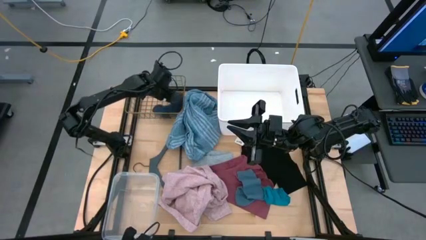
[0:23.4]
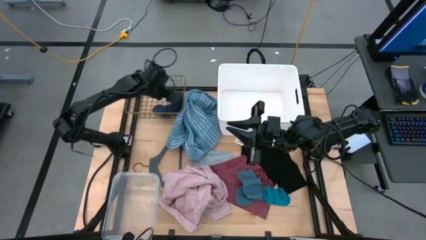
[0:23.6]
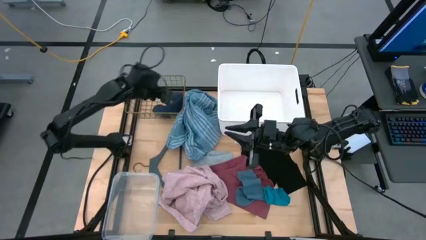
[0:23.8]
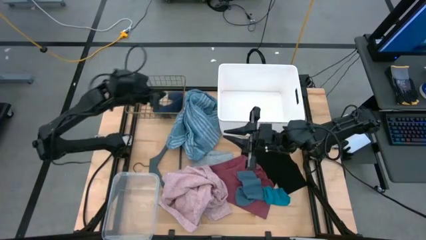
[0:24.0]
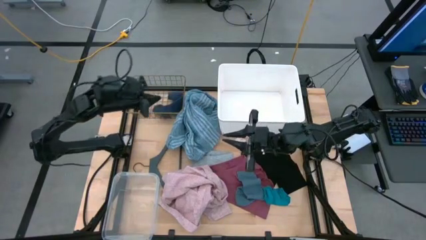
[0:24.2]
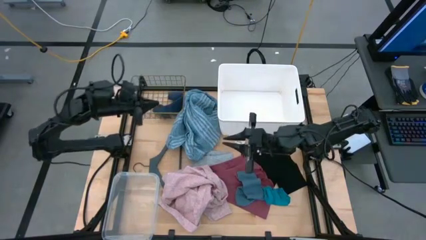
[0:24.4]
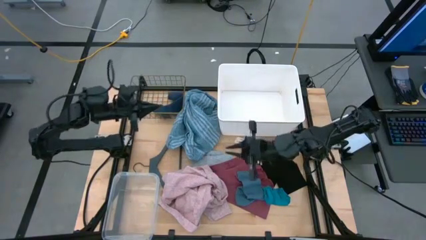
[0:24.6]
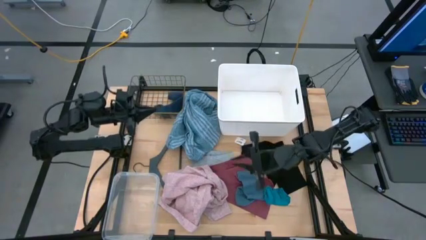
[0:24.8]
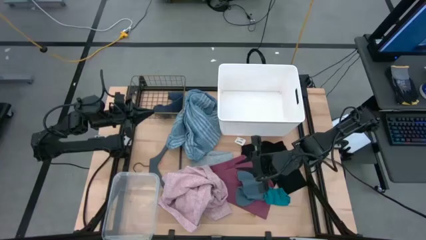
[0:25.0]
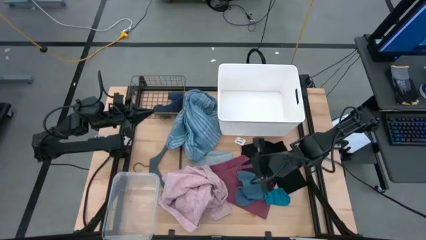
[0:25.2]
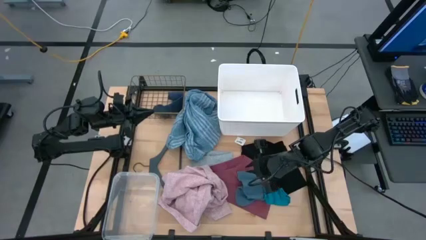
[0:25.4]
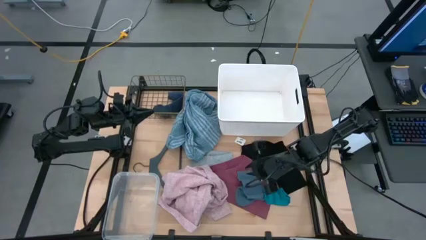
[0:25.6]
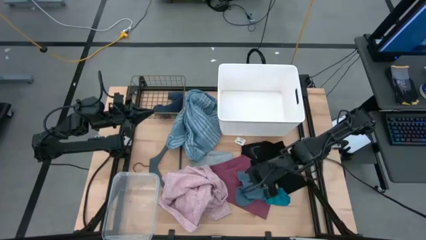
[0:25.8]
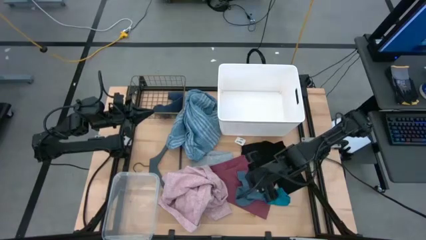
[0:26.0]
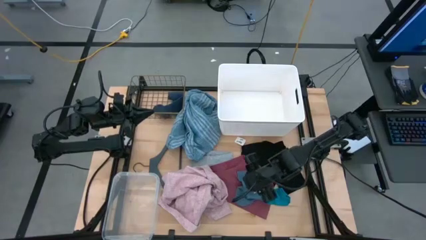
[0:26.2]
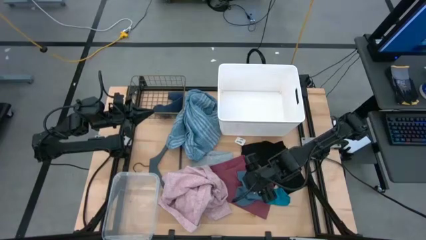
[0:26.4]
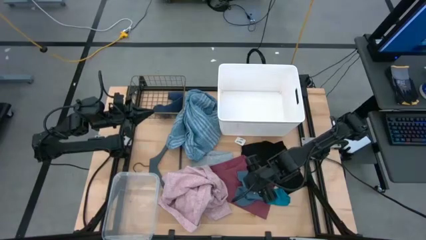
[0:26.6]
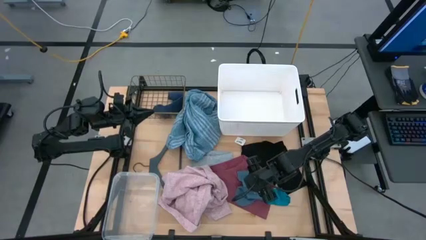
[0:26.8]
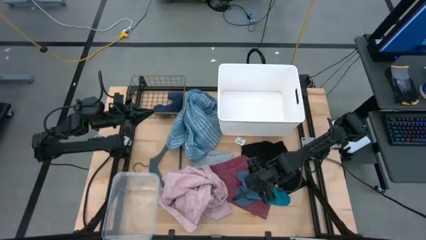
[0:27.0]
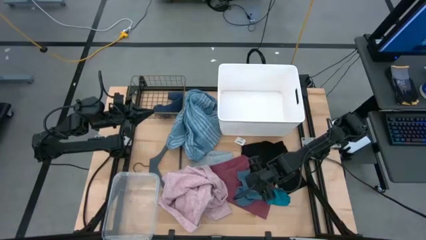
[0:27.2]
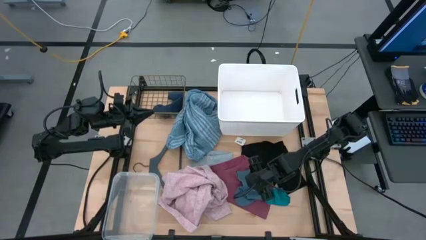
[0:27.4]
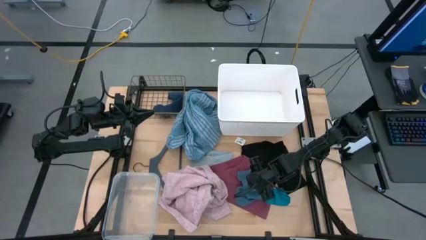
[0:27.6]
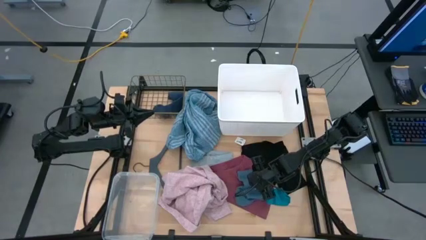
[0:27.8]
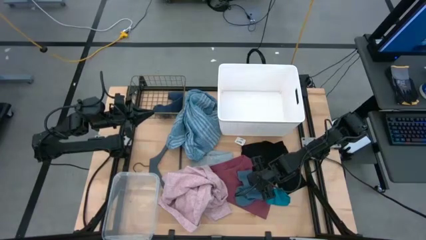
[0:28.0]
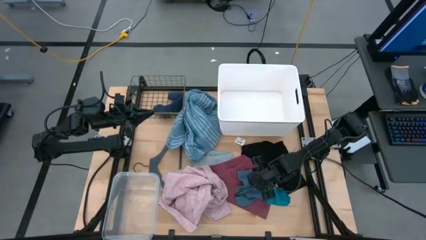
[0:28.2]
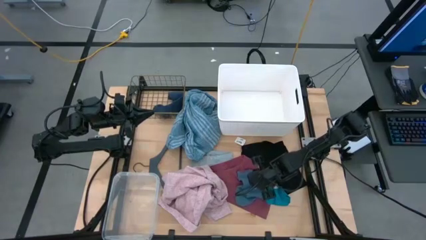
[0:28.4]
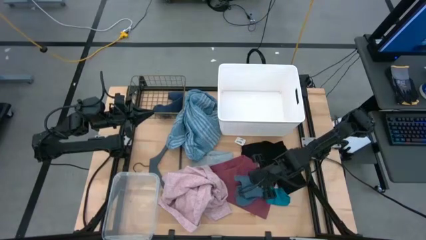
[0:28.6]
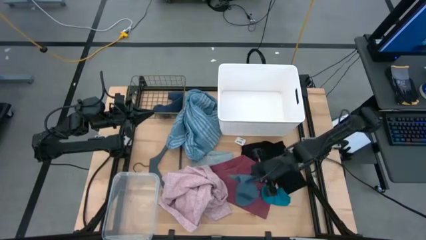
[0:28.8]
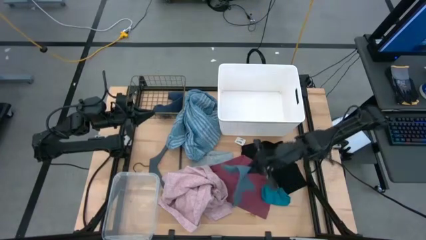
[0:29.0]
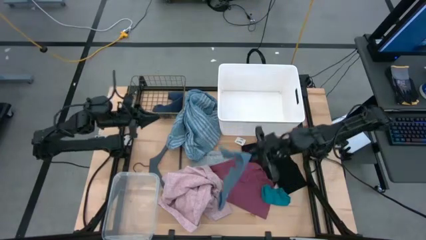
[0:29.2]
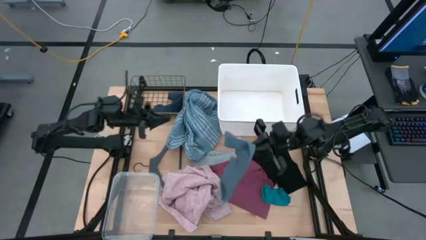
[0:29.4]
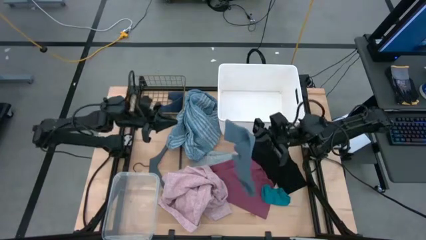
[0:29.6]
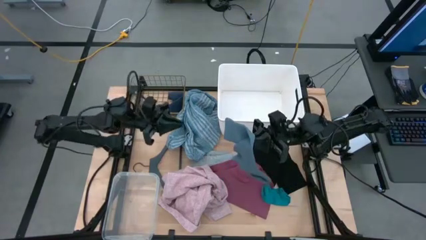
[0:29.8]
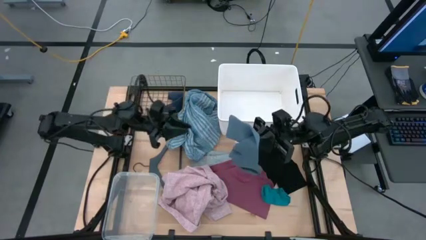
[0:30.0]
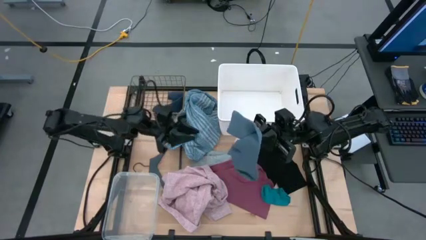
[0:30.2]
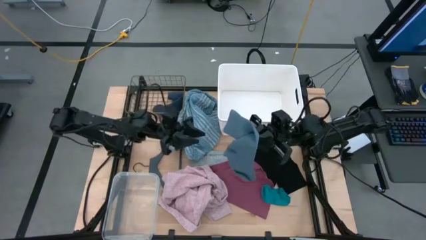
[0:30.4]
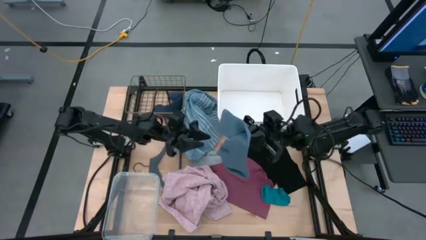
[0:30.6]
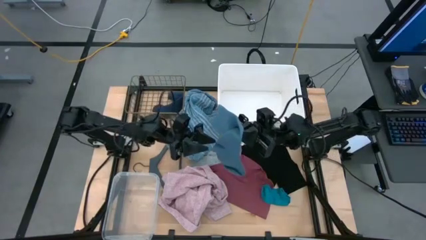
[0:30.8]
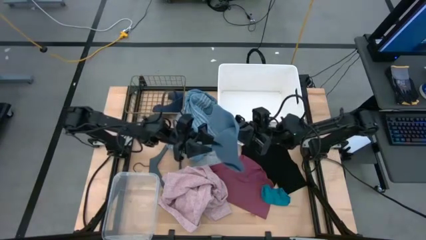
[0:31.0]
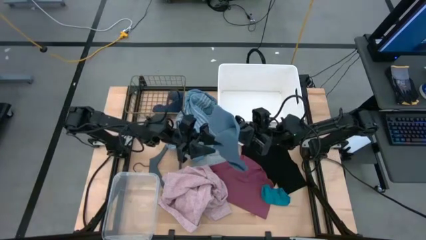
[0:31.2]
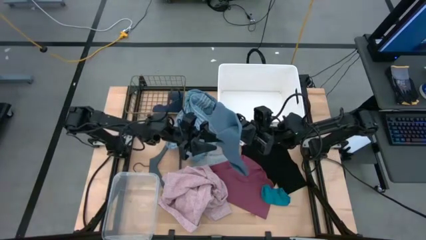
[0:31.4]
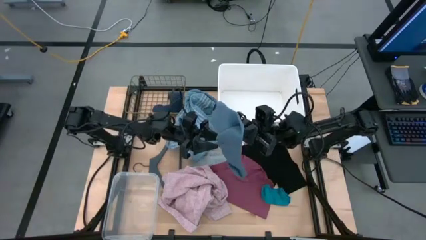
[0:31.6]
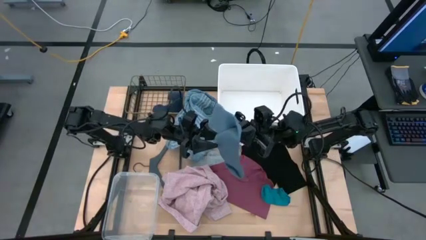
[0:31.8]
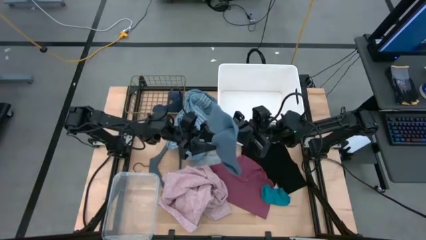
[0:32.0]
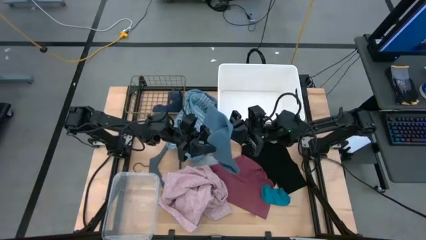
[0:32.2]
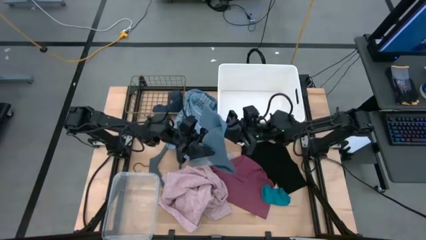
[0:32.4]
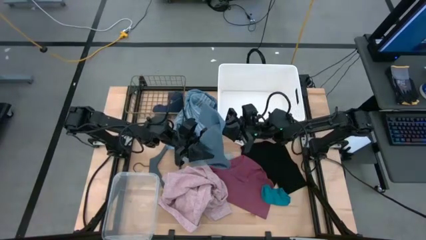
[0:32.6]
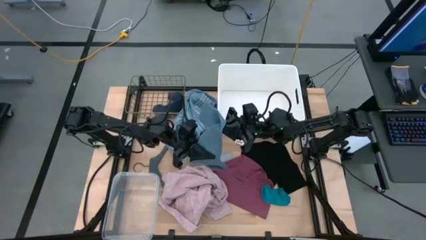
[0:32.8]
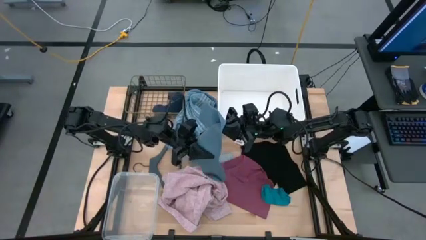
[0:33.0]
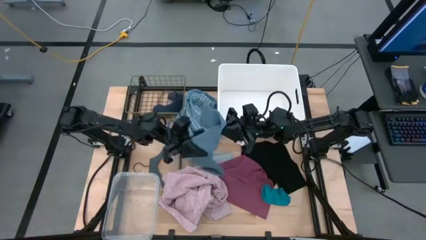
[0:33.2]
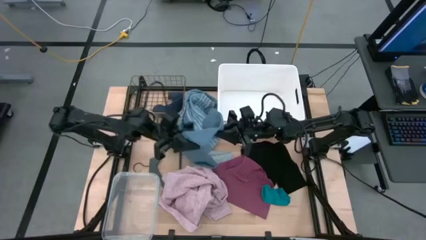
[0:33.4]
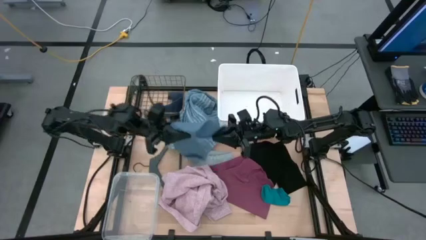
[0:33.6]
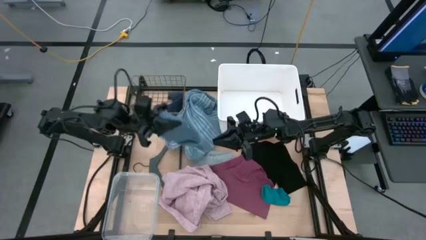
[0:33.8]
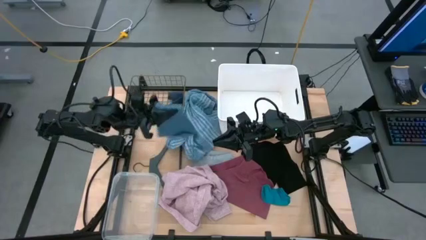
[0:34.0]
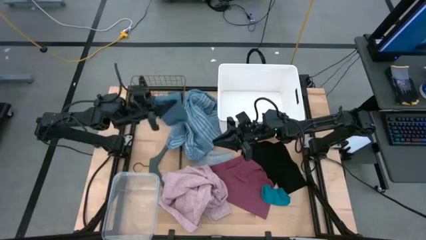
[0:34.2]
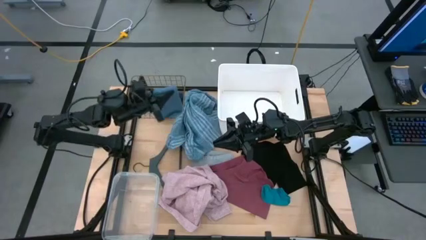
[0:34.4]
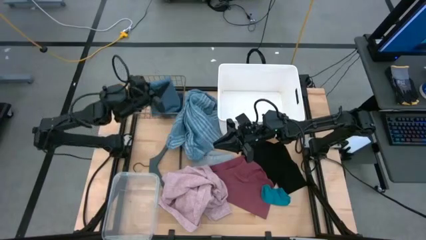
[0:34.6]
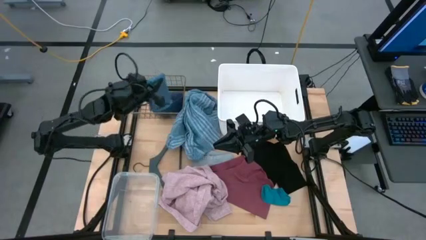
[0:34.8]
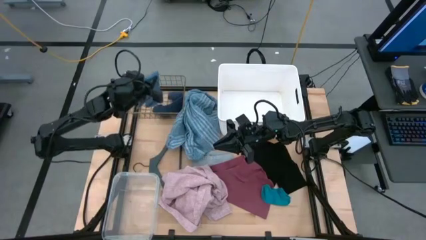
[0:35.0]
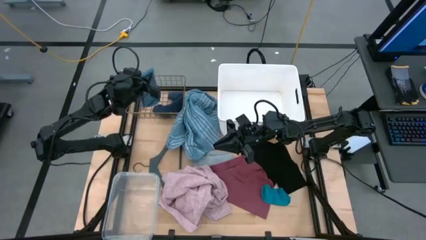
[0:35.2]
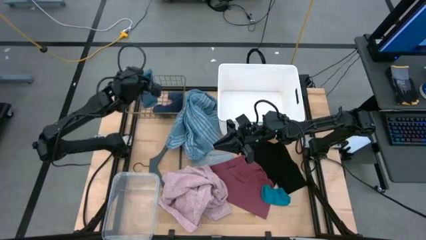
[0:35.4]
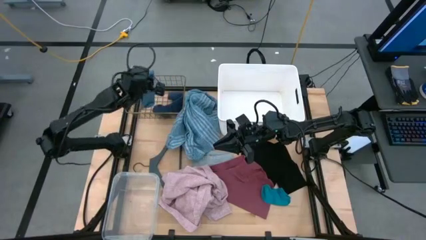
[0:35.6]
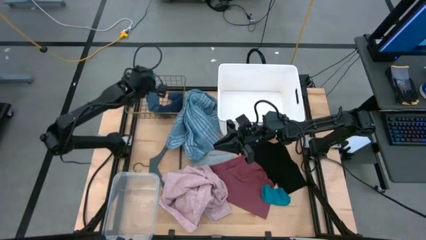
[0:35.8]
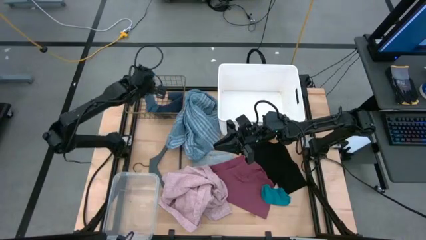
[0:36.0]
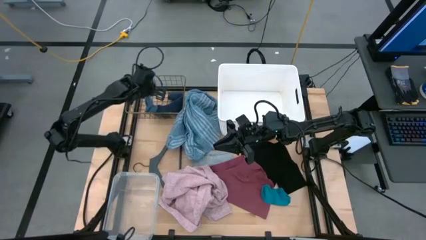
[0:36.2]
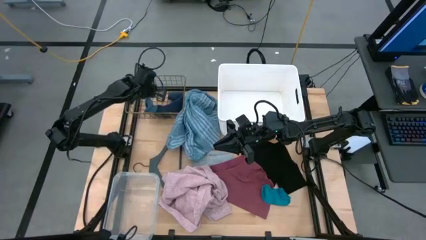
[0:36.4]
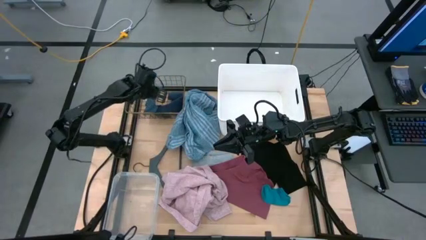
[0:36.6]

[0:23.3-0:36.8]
Task: Pick & Place Cloths
Put the blue sock into the wire basket

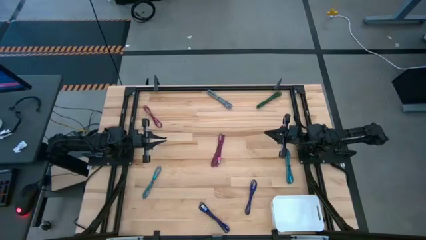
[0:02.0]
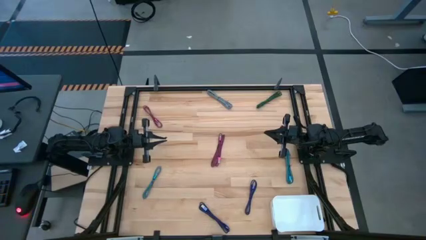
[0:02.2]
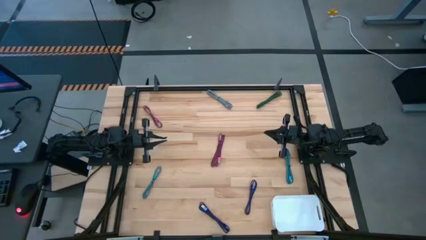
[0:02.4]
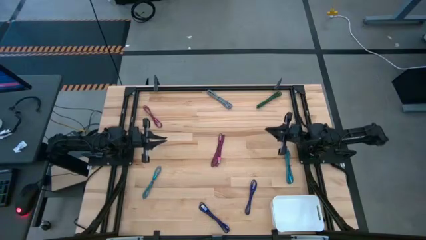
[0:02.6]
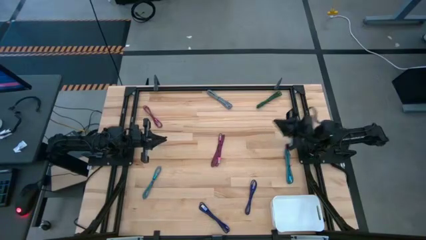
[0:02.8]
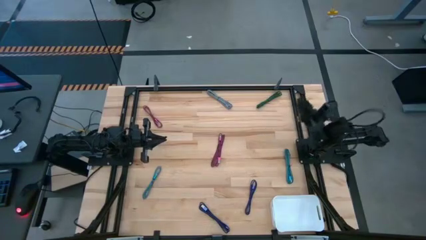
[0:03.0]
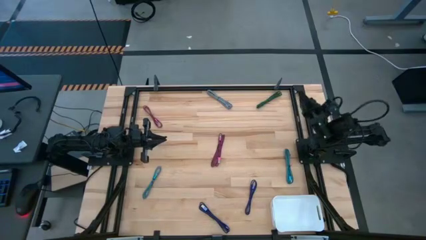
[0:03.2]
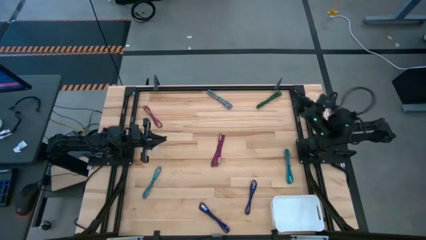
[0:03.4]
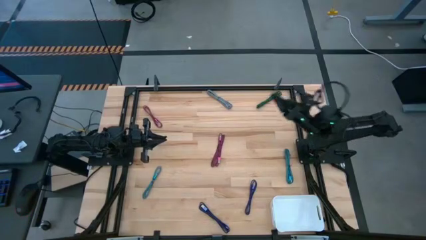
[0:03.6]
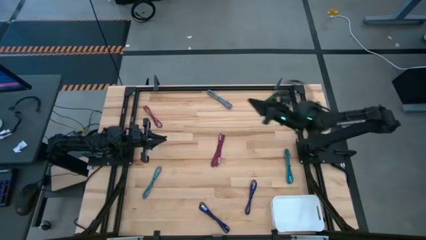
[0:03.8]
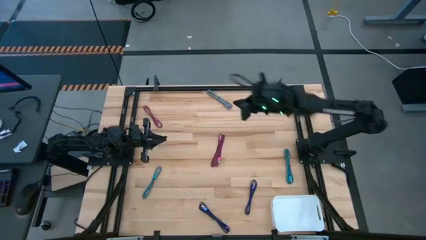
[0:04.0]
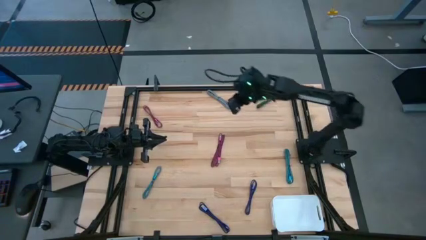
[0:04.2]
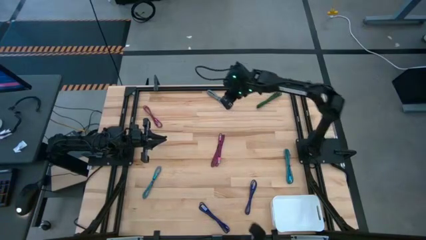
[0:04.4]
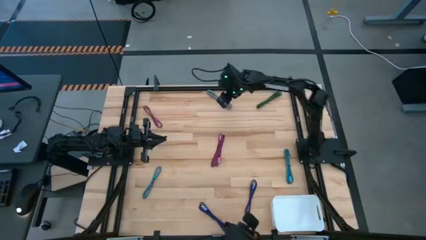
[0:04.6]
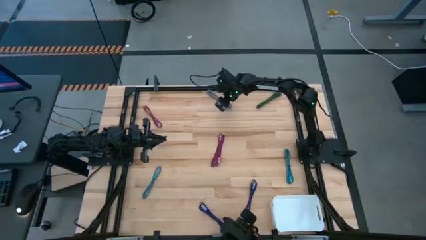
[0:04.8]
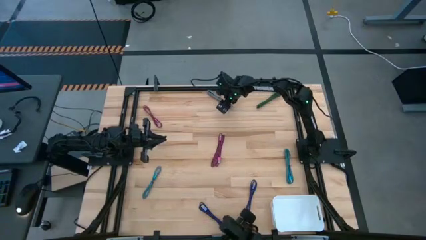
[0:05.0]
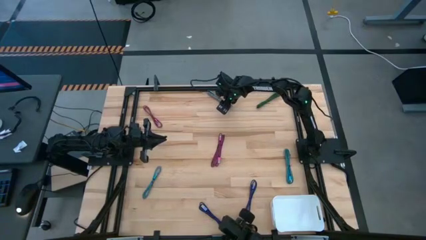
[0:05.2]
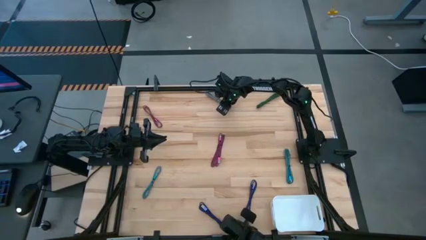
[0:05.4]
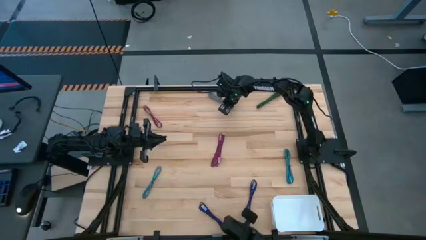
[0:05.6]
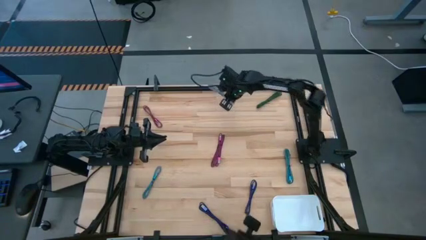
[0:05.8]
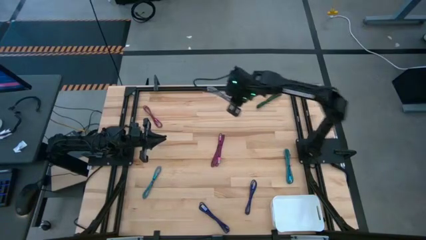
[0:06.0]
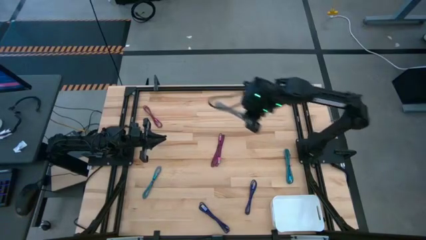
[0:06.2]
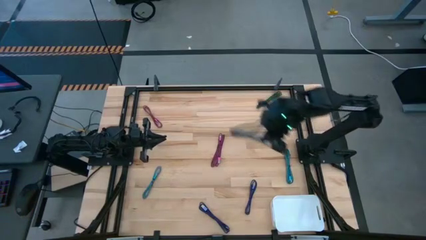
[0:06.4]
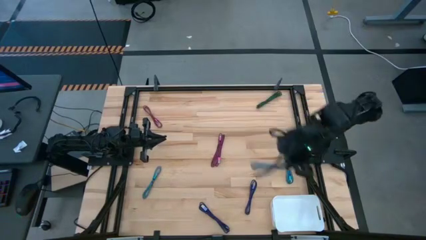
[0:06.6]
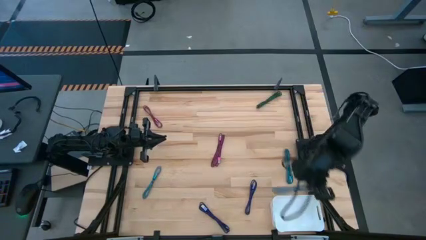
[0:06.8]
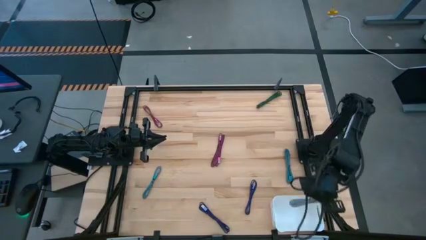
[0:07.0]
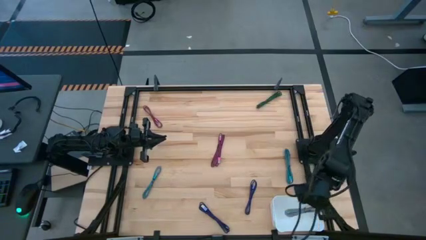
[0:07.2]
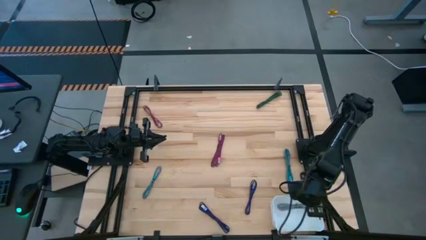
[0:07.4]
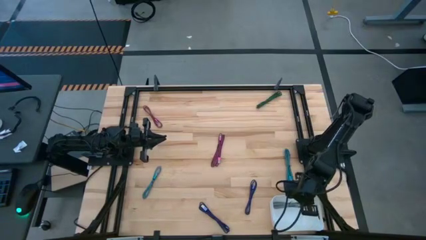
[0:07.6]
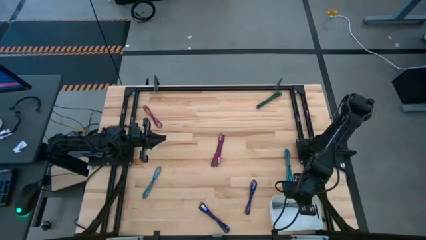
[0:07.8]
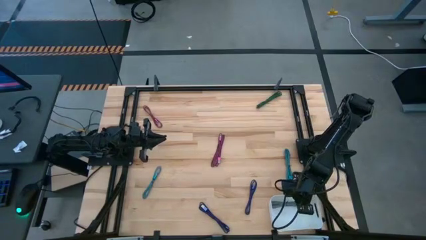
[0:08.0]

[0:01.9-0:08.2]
Task: Pick and place USB-C Cables
Put the white and black USB cable into the white bin
